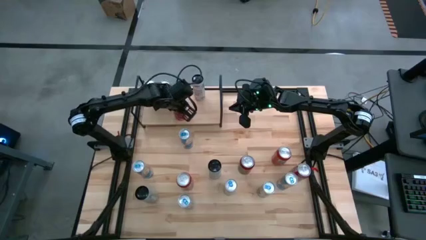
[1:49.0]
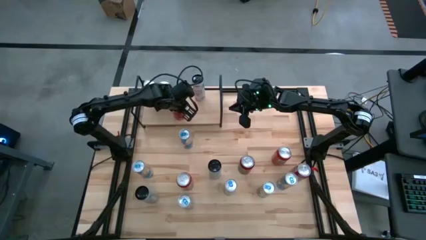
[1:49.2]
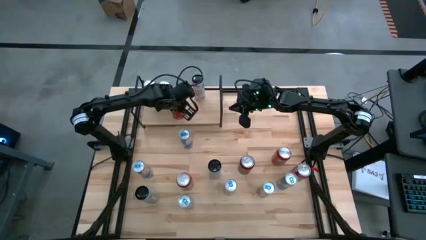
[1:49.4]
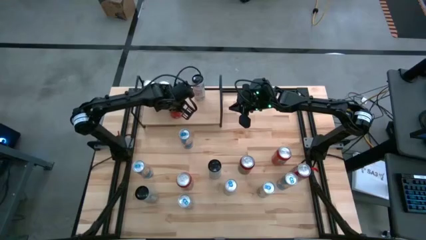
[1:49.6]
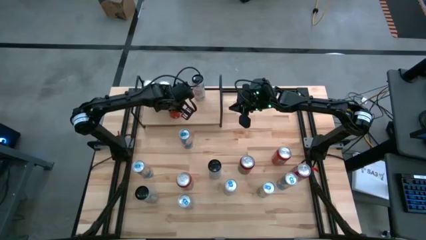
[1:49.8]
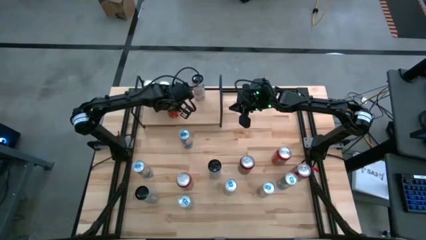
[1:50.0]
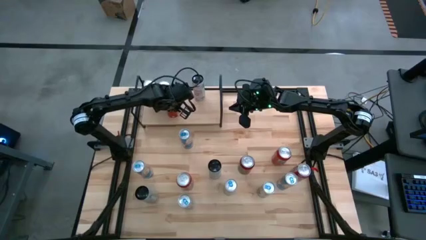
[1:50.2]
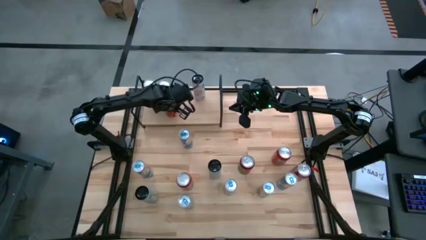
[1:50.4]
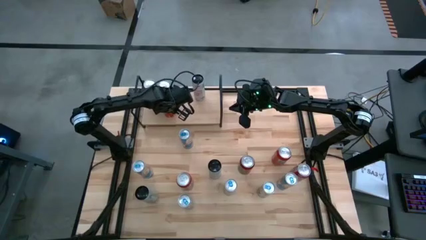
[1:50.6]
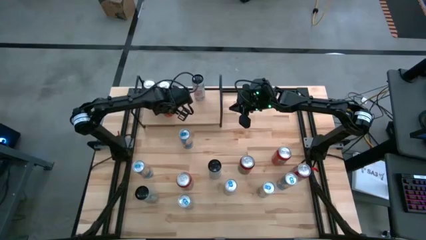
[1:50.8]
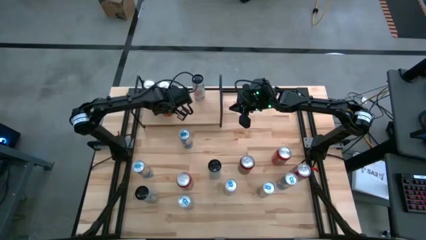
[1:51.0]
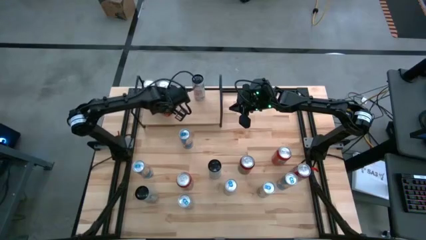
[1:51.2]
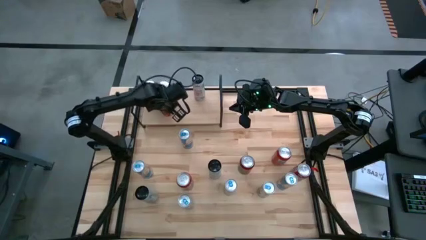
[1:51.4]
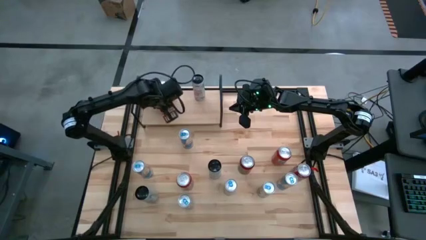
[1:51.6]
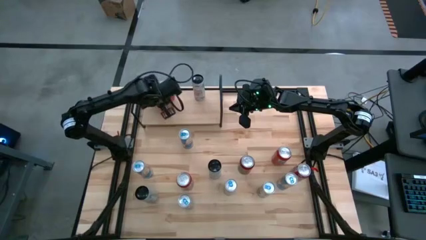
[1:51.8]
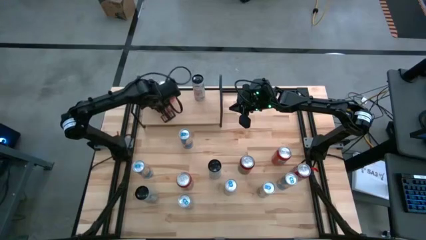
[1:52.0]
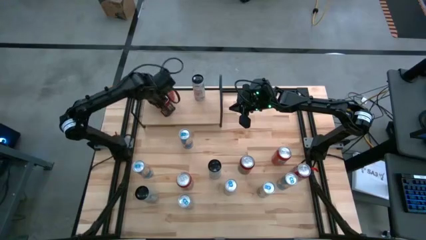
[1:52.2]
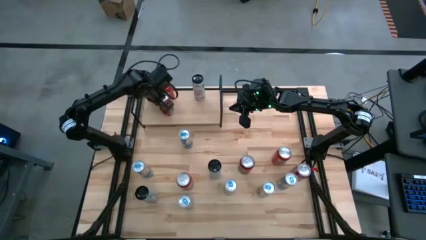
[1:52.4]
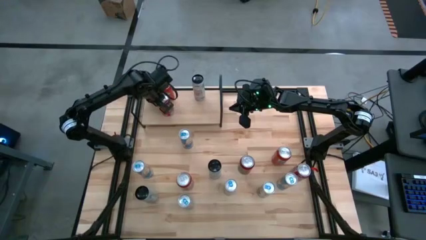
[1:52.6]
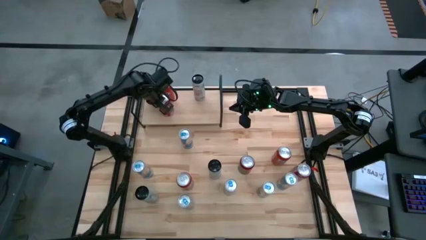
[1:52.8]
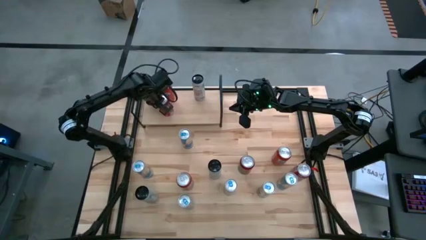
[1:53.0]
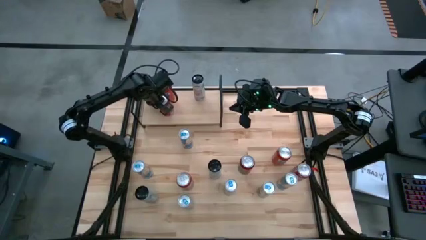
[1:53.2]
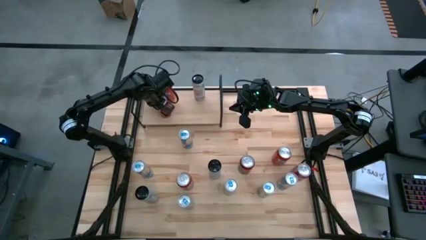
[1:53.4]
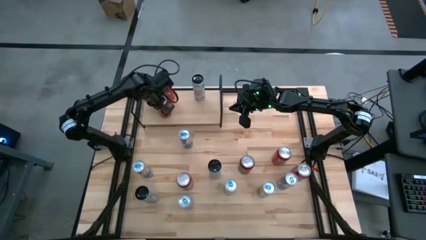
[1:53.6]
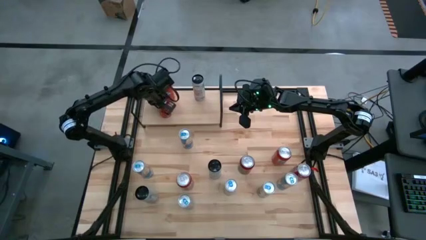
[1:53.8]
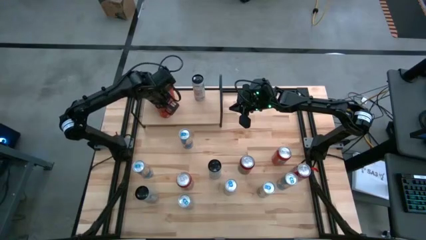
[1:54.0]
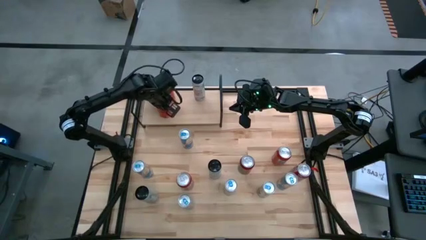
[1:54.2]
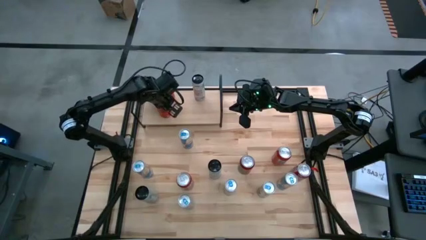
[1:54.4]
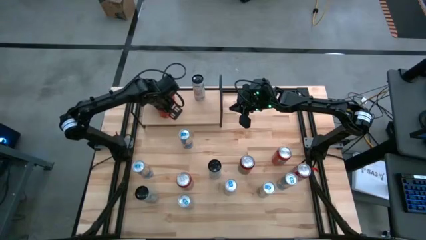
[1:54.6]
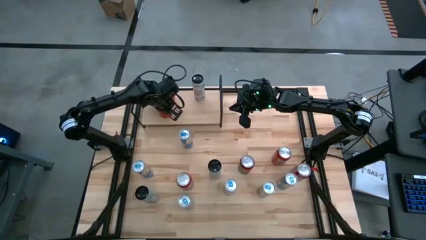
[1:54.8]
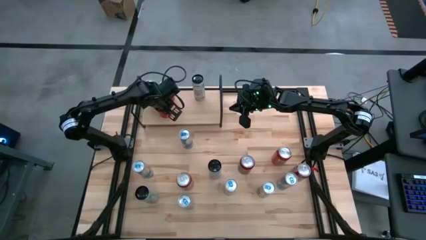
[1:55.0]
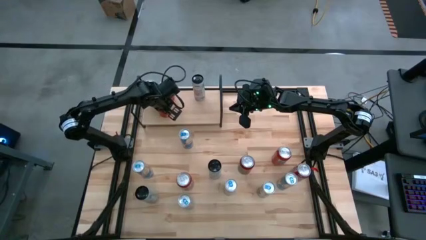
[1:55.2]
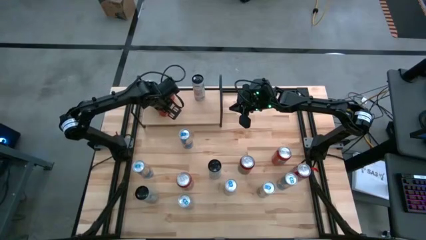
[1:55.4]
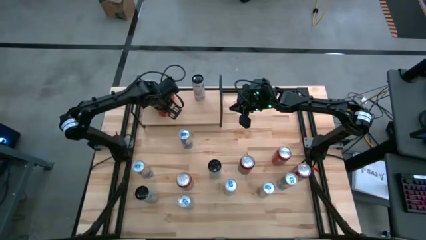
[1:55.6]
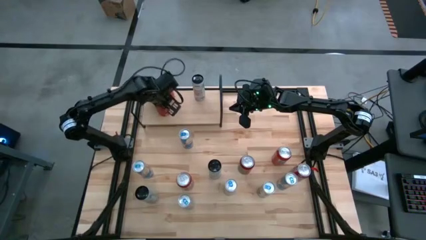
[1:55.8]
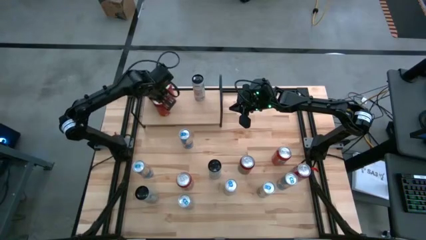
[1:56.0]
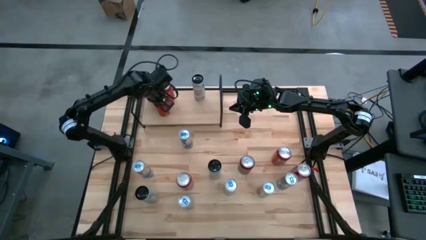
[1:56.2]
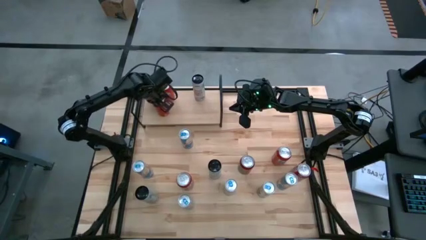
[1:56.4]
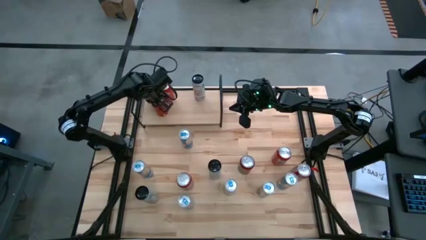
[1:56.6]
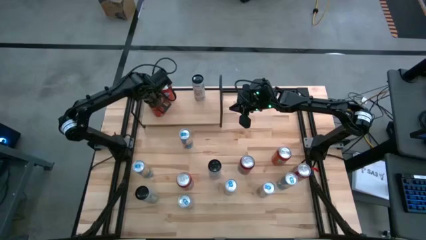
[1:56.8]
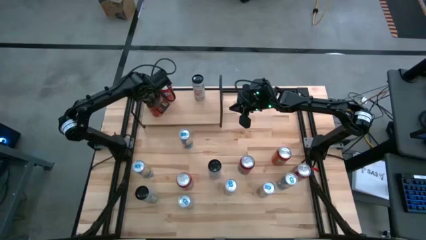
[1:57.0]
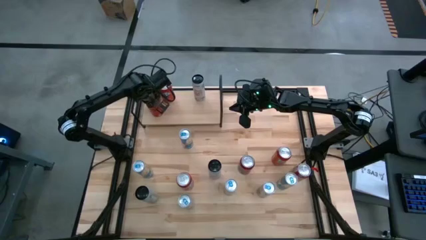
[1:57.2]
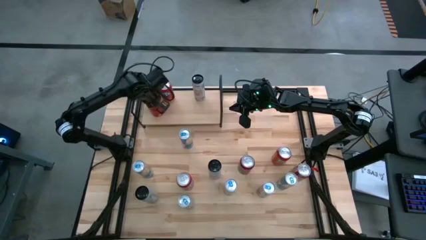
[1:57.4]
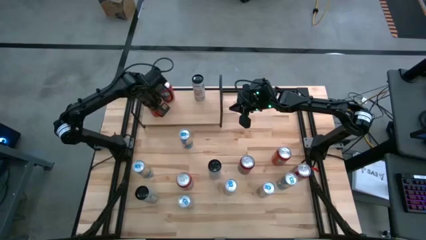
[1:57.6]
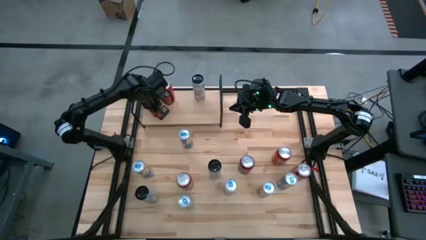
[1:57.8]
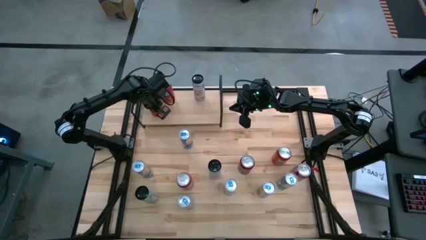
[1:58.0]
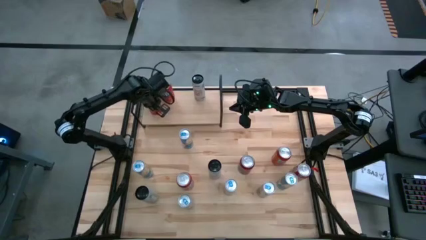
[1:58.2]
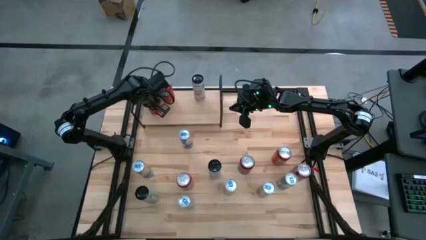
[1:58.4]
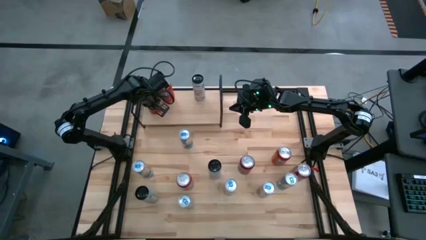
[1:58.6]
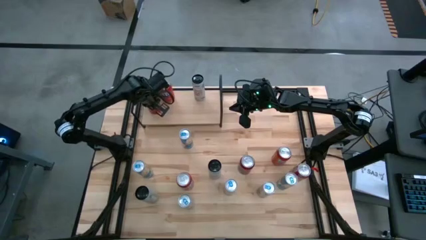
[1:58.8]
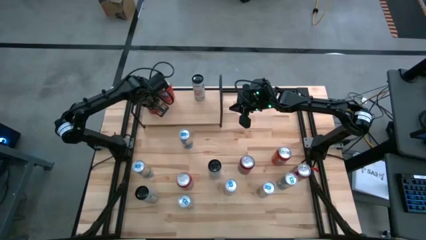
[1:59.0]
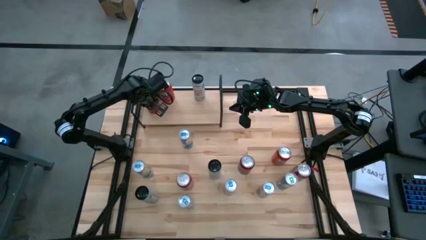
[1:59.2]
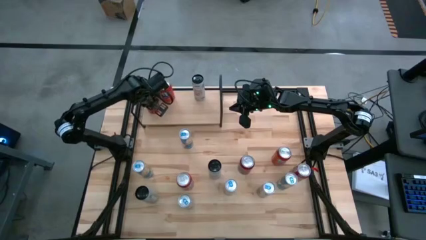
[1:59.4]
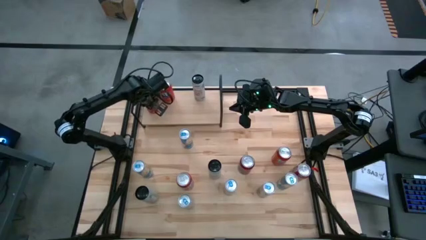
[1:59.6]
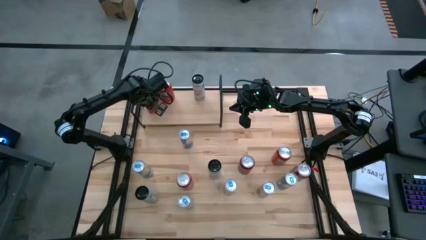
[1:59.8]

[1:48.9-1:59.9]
Task: Place canned beverage on shelf
Put the red and black soda can on the shelf aligned with the other red and black soda can
